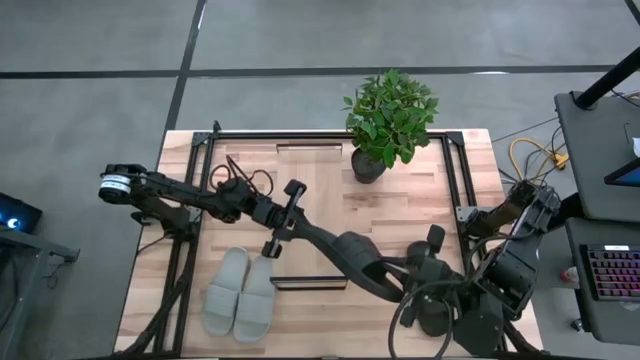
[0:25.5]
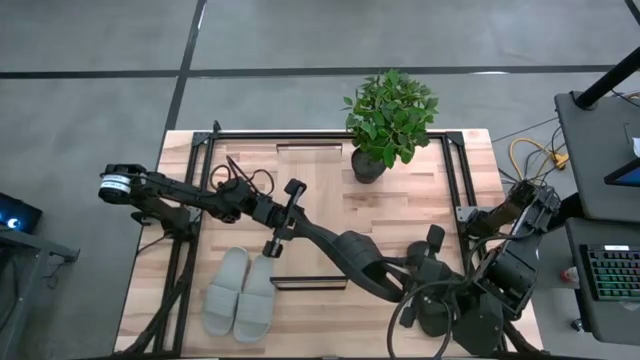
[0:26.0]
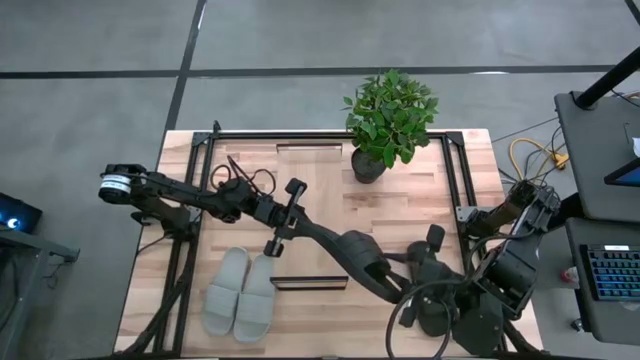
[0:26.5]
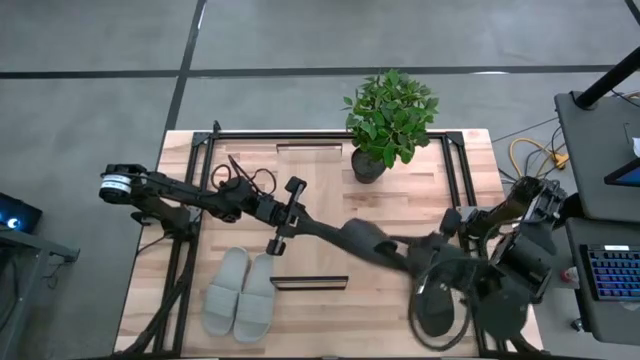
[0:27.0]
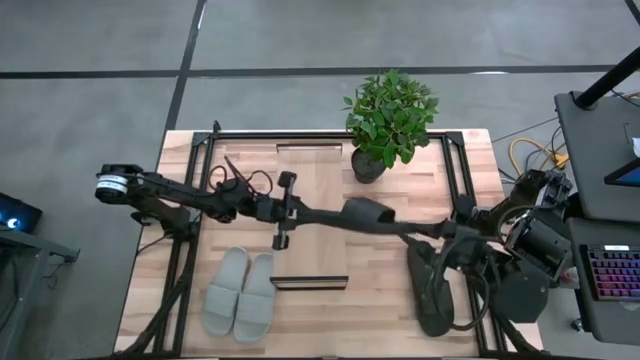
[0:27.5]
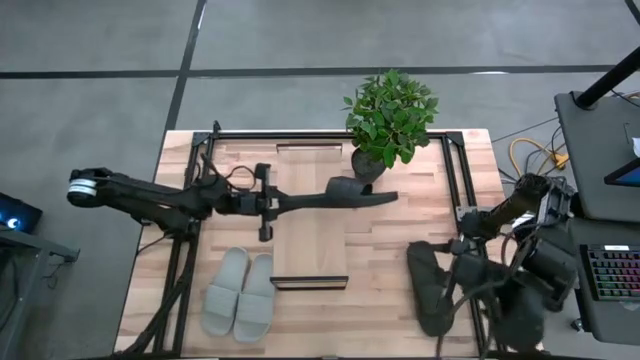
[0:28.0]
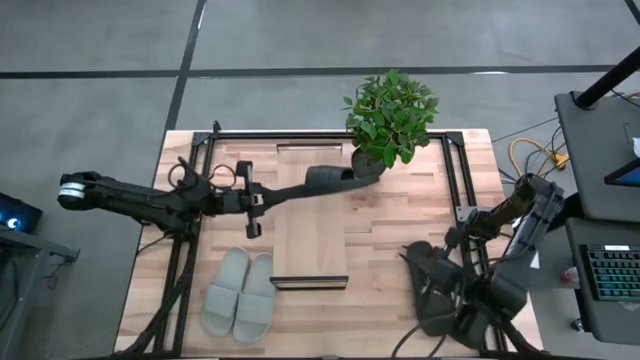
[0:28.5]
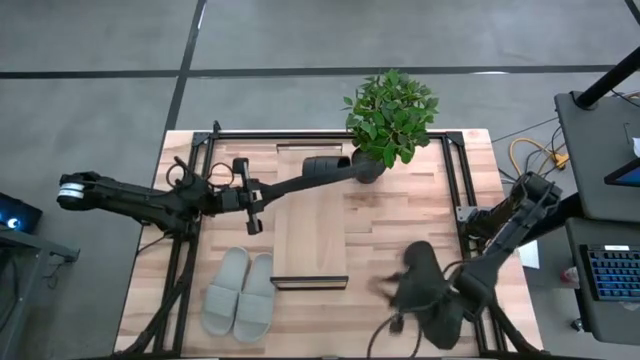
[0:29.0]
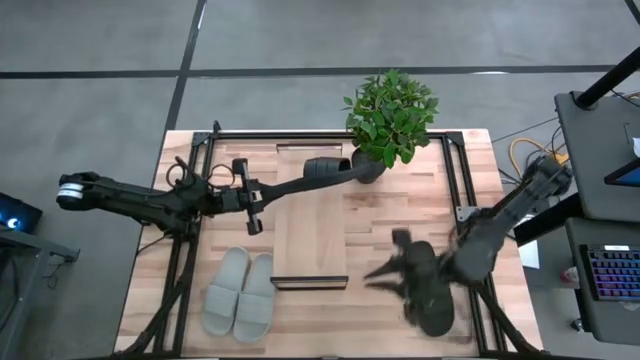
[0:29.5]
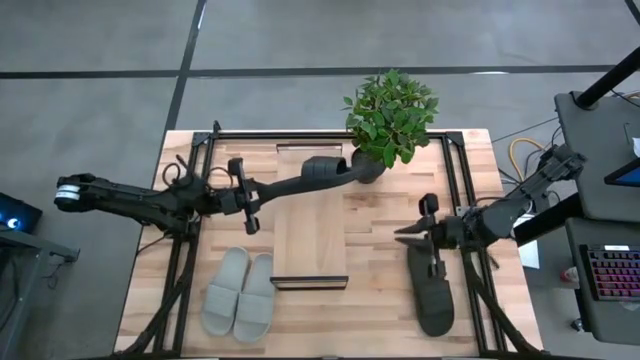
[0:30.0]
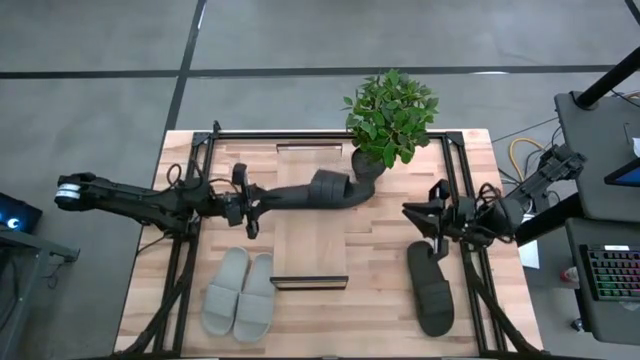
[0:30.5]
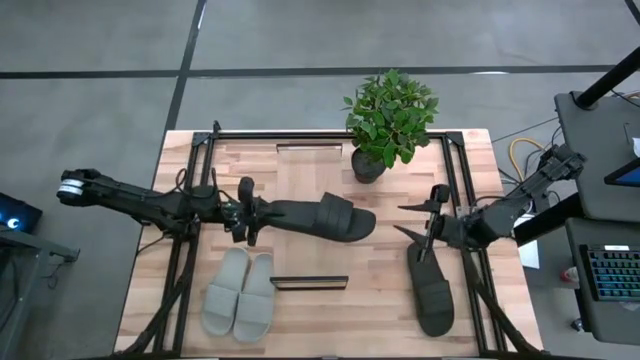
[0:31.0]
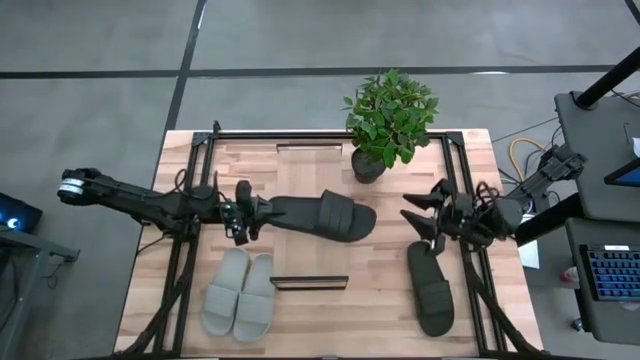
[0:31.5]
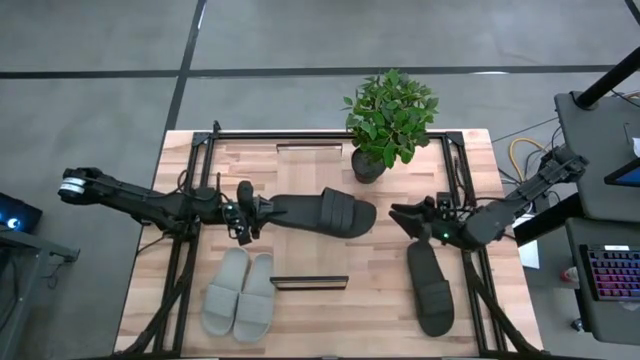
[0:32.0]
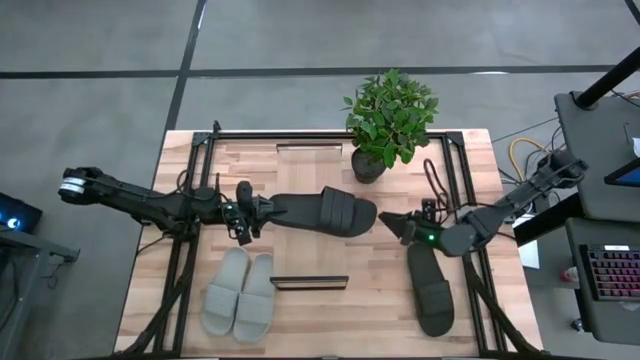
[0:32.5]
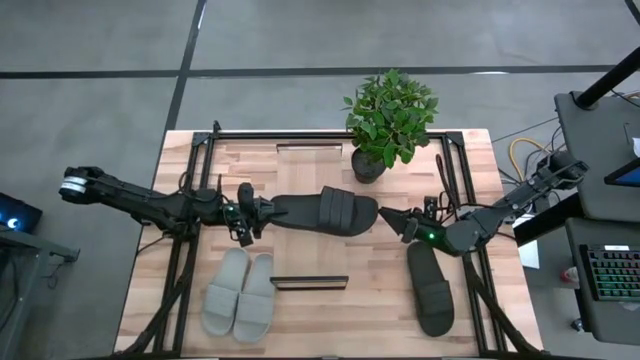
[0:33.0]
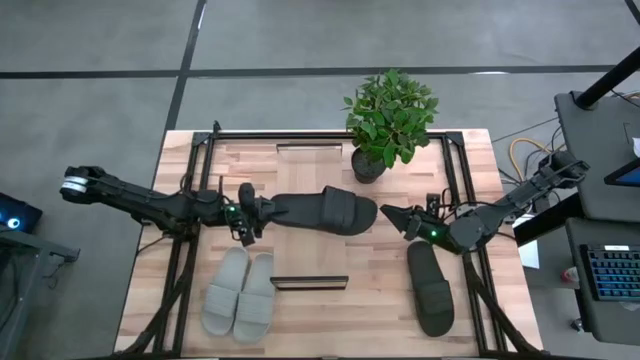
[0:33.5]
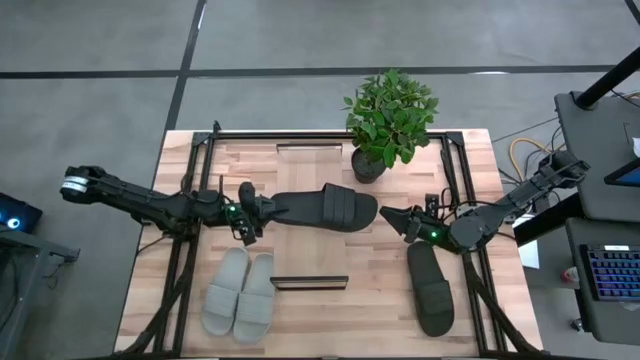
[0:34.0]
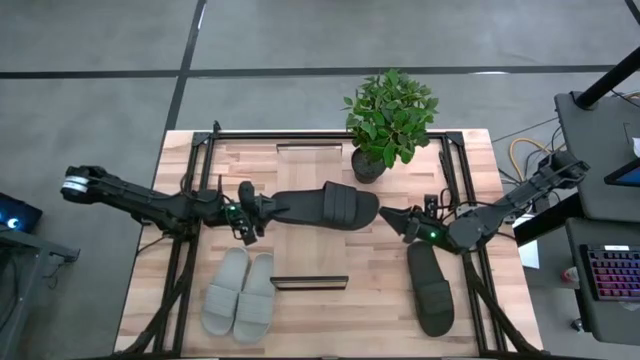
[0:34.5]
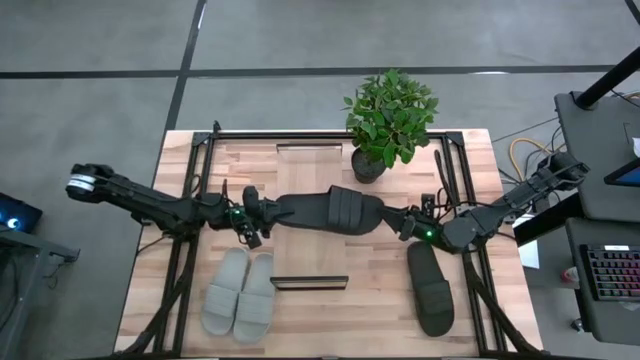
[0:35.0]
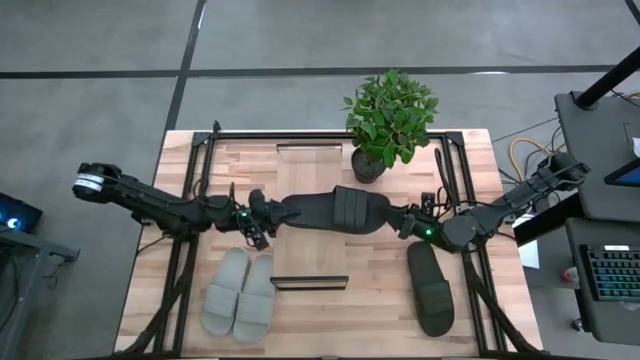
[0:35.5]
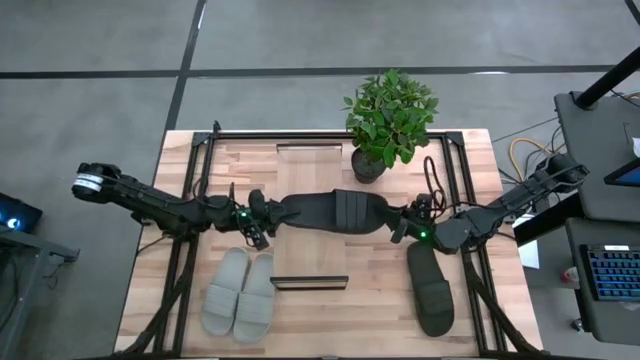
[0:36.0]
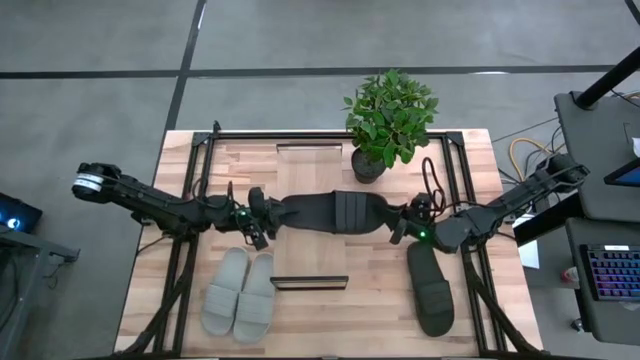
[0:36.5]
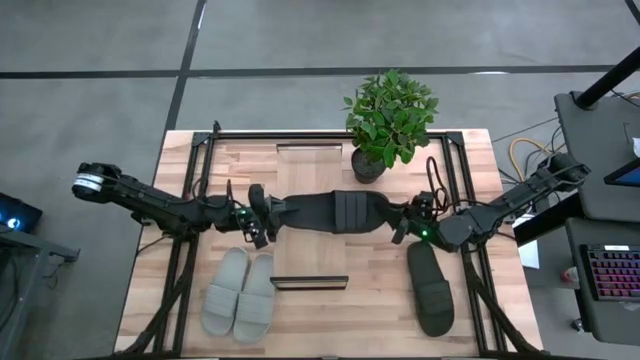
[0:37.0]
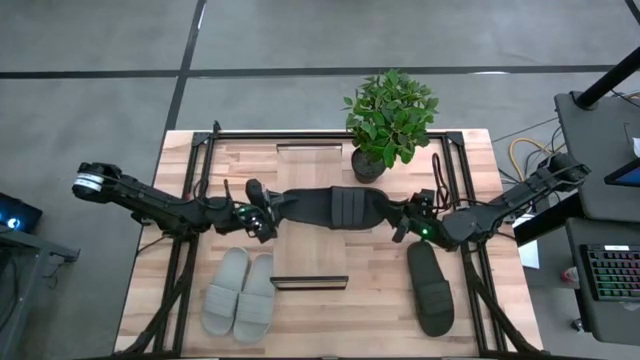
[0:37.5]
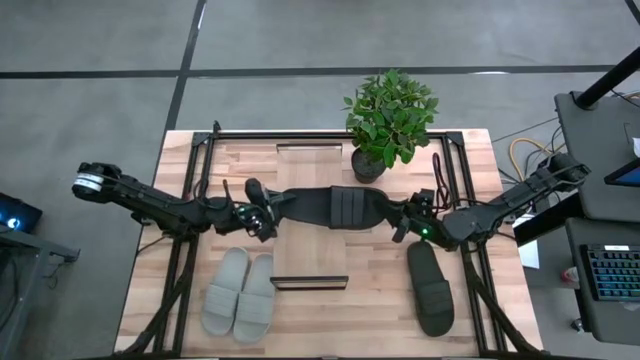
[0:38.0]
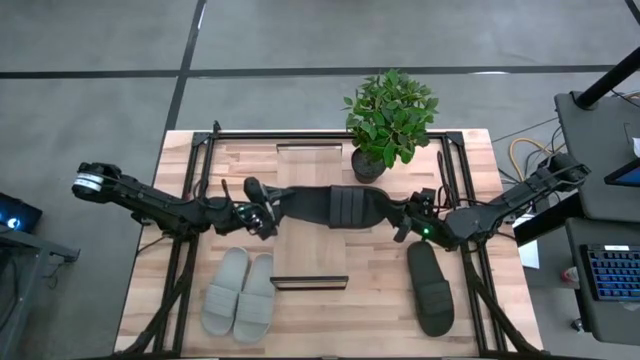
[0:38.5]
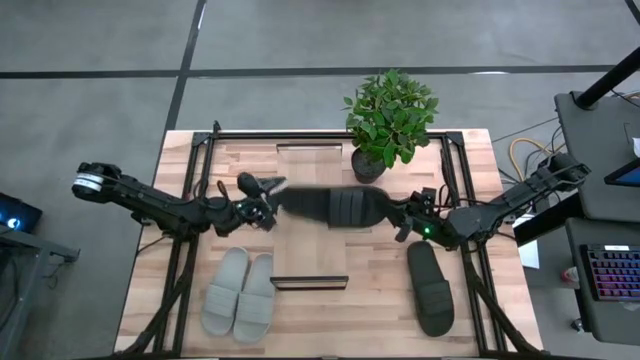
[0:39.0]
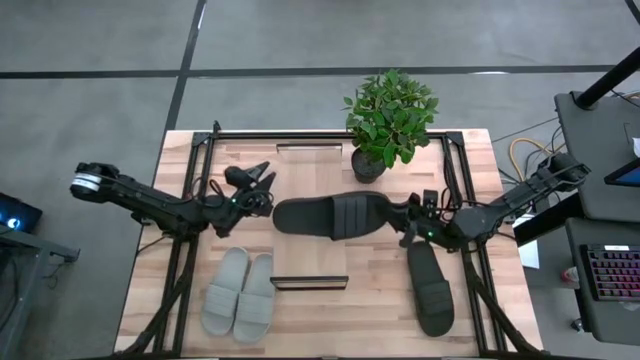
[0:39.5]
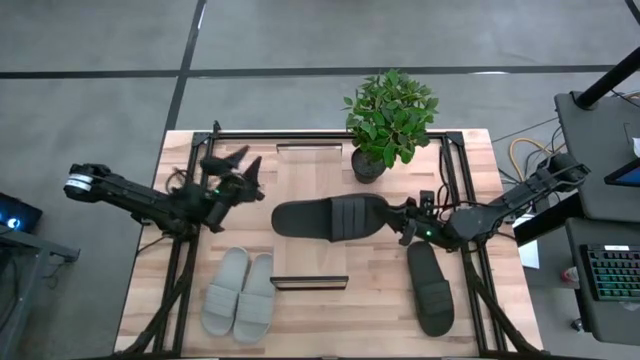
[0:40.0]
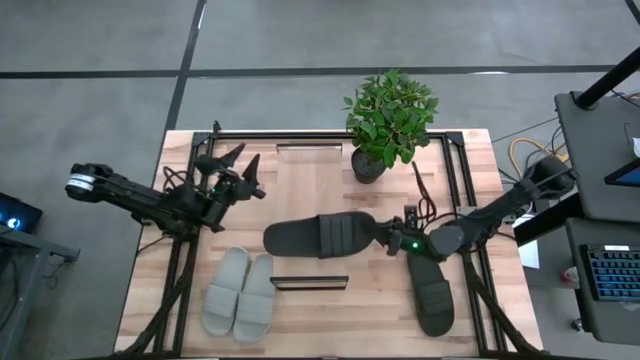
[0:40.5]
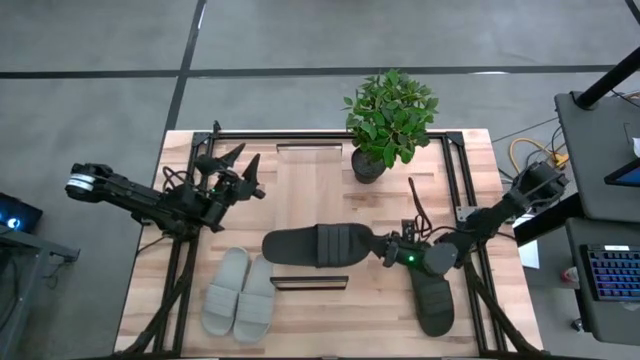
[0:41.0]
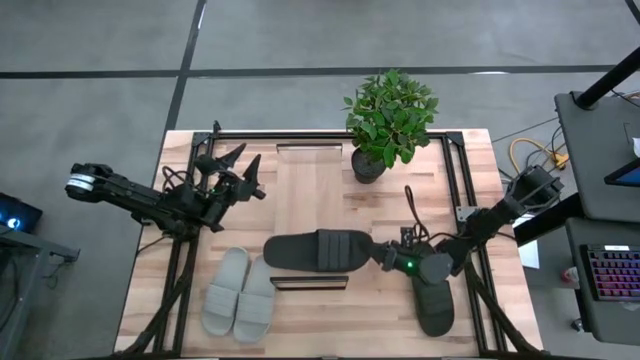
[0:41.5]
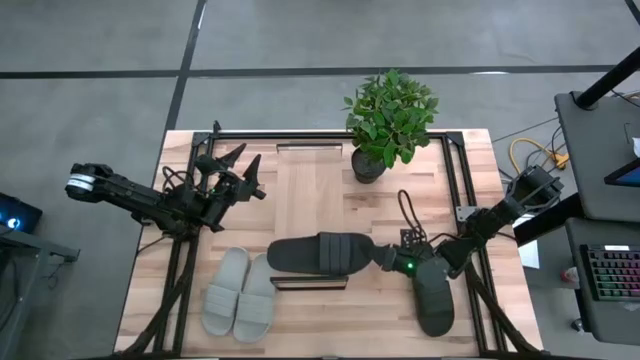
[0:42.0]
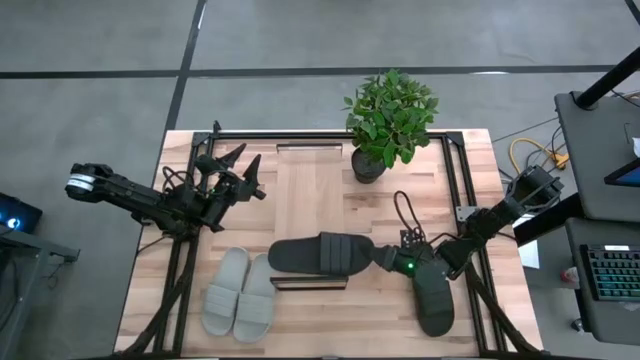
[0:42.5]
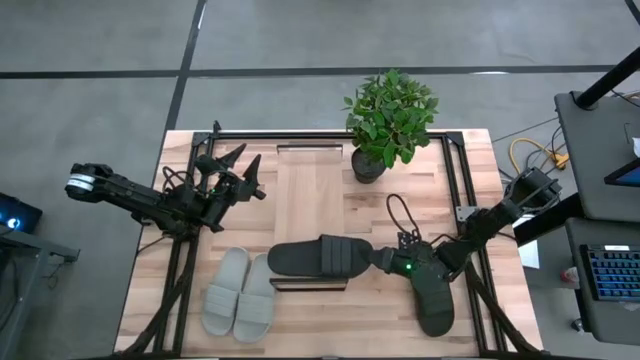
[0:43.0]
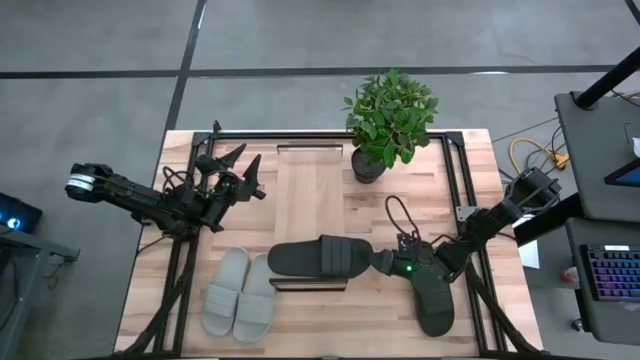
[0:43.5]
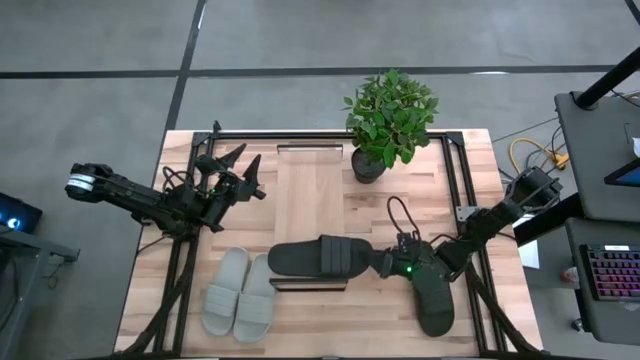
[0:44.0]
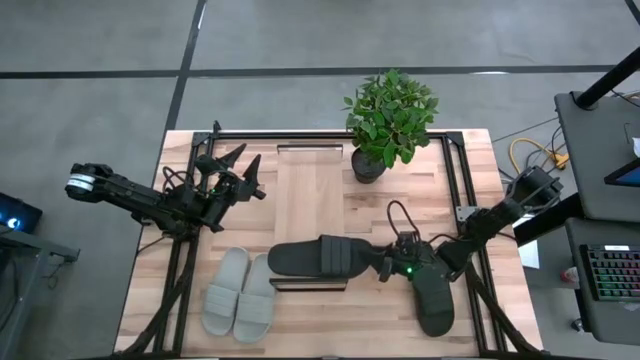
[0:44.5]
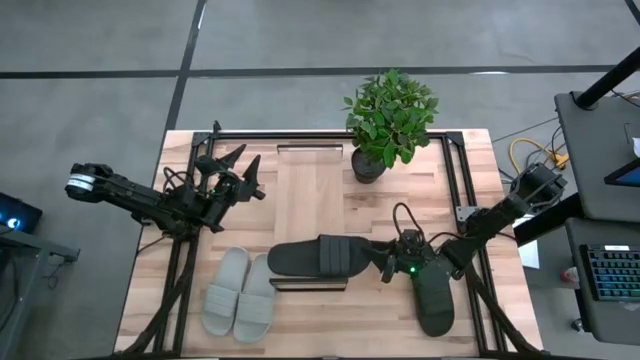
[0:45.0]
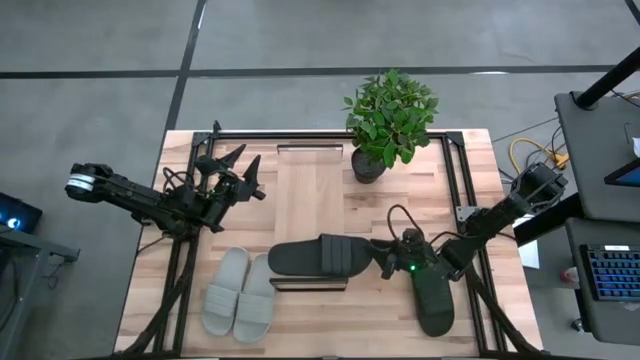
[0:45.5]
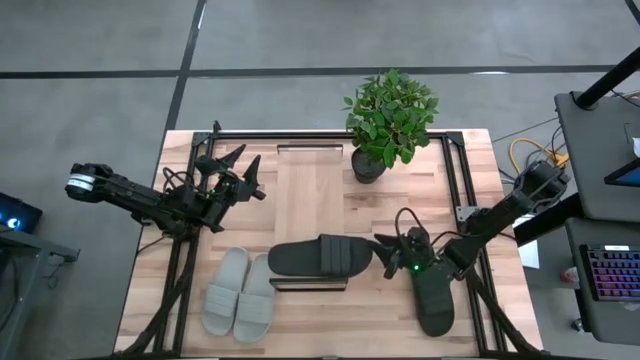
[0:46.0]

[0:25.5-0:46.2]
Task: Pick and place slides into the shelf
Put the left black slipper on the shelf
